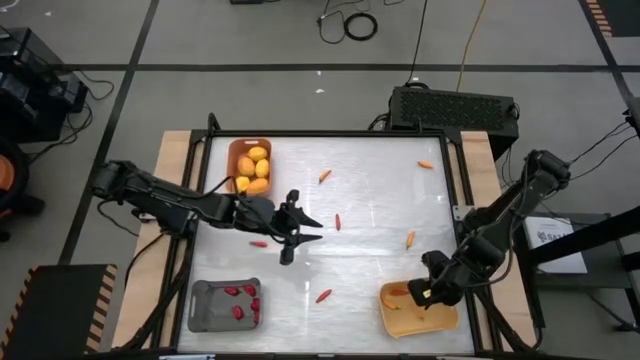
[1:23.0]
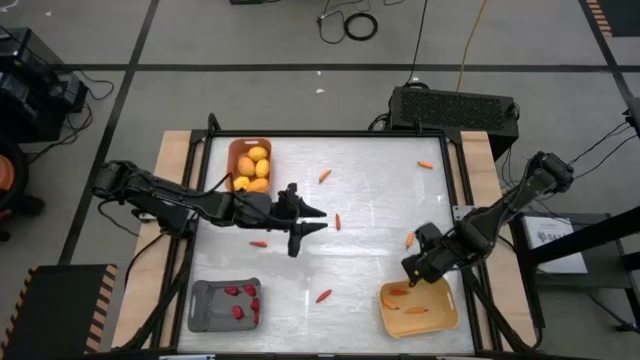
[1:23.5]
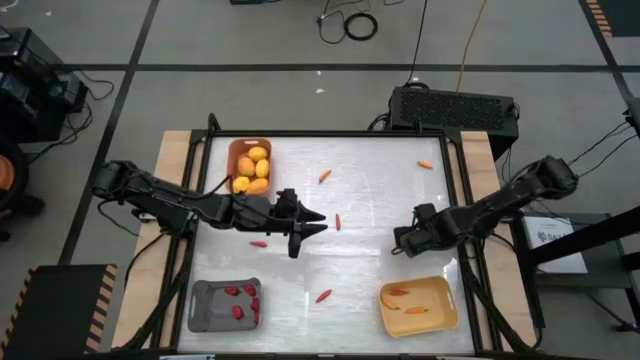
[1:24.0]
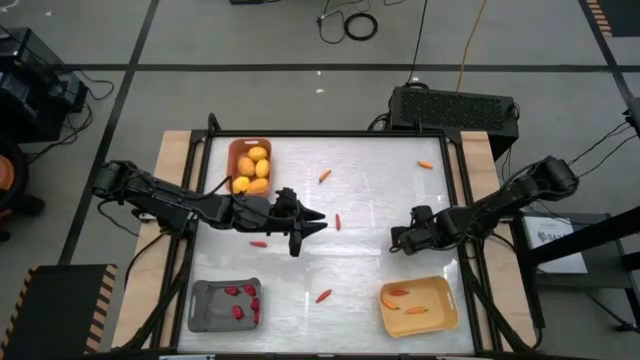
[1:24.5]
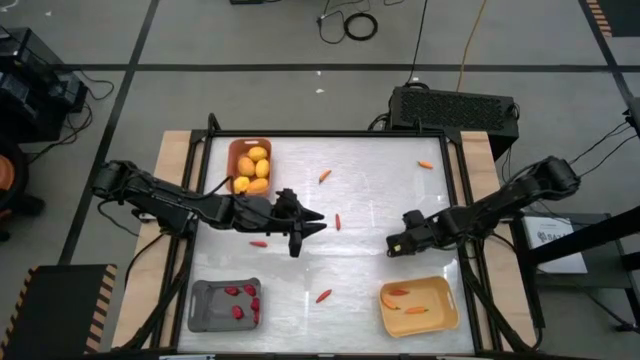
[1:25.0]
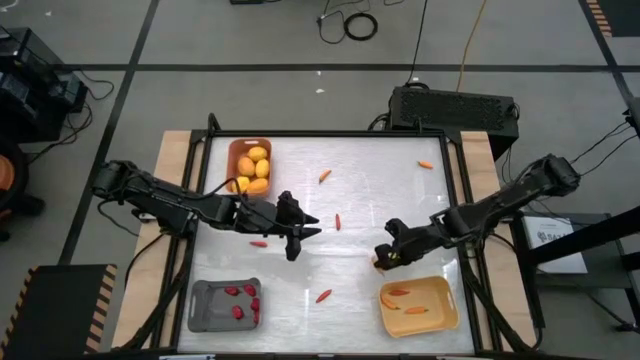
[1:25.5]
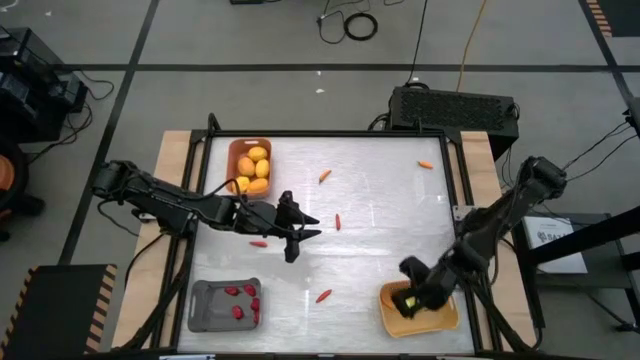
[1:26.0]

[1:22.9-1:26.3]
Task: Sort produce into baskets
Put the orange chili pepper into the yellow bin

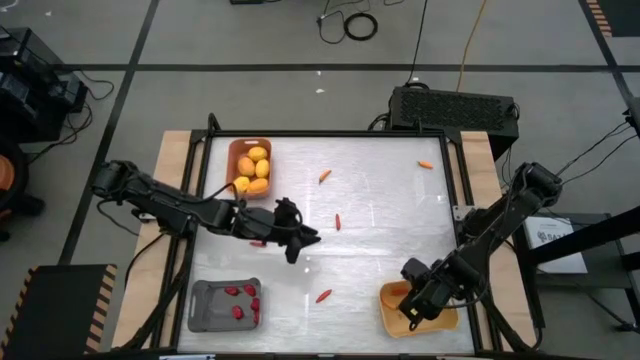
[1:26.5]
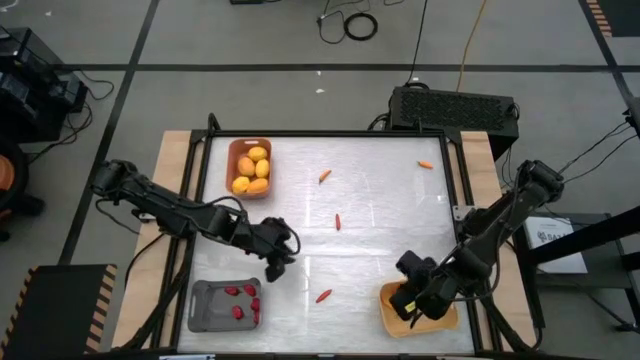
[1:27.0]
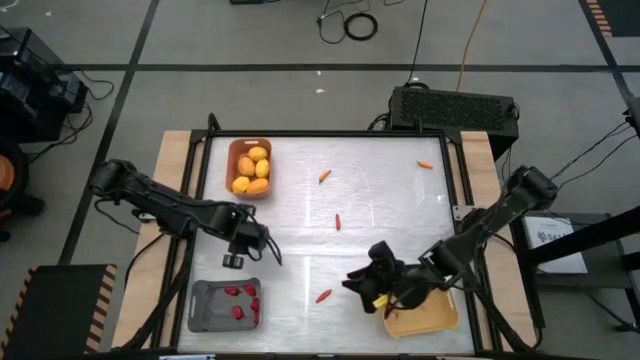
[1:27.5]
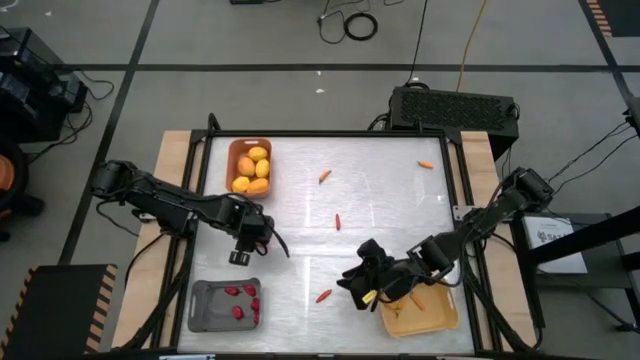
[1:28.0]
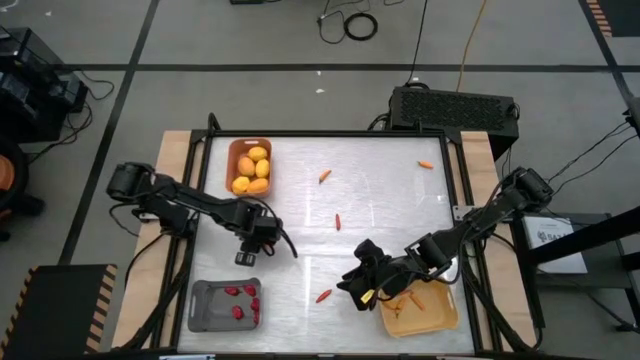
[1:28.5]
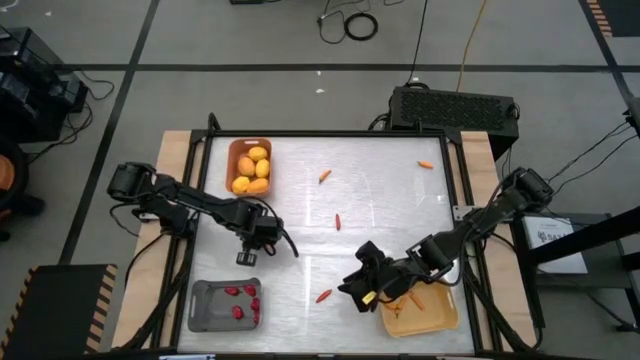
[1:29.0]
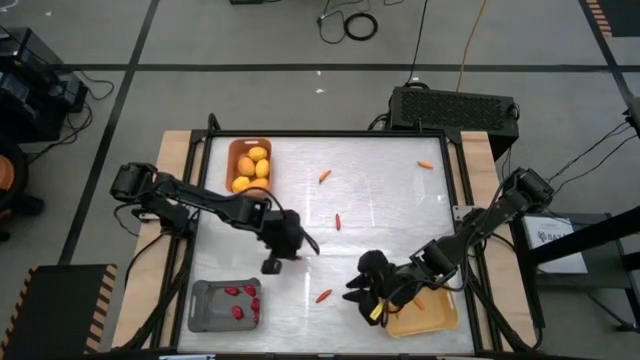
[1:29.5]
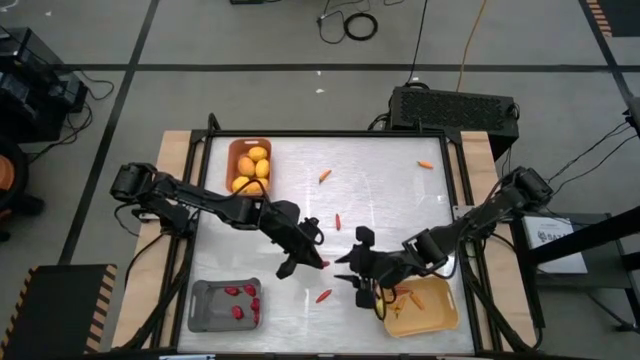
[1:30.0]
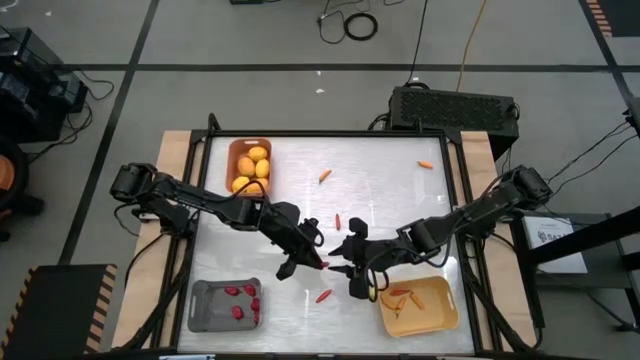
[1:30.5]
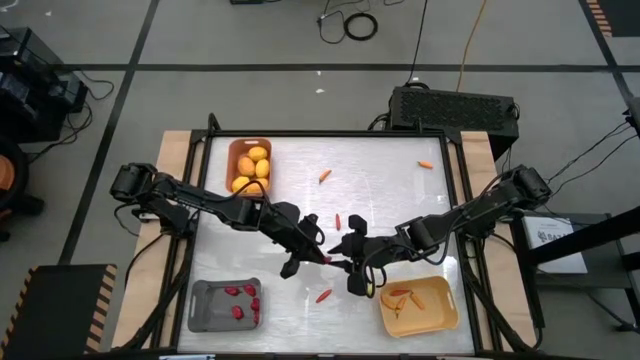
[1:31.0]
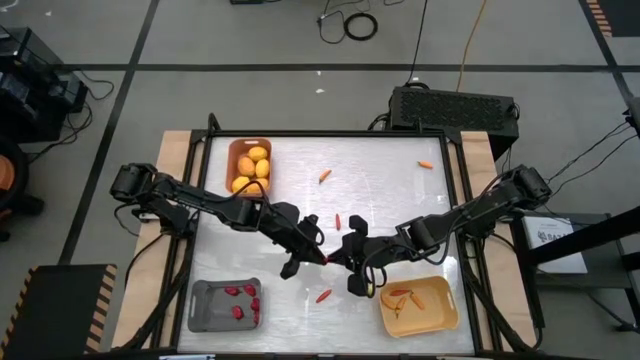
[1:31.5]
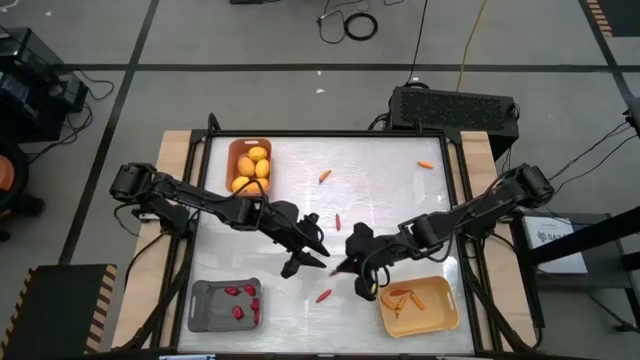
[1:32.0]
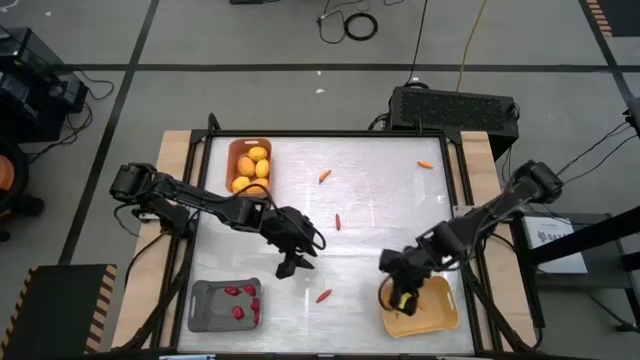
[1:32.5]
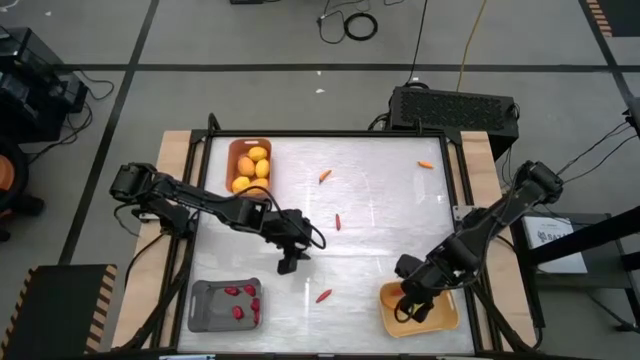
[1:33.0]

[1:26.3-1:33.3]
Put the red chili pepper into the yellow bin

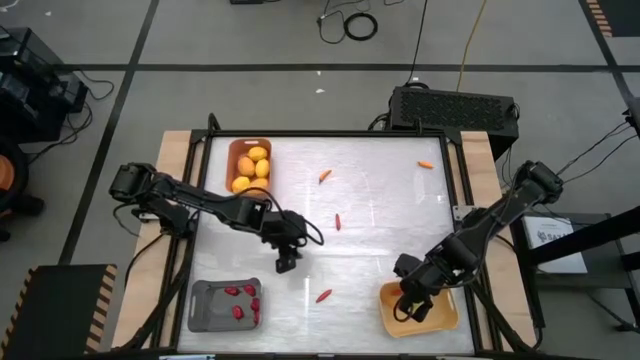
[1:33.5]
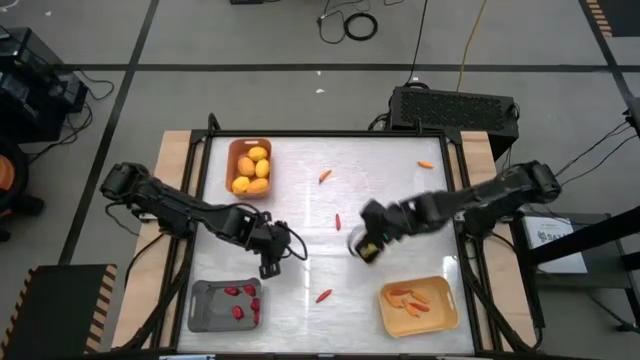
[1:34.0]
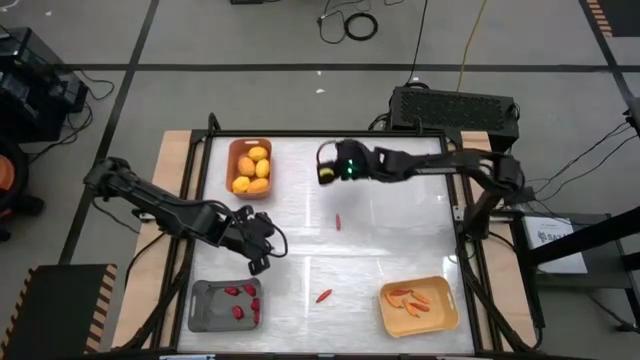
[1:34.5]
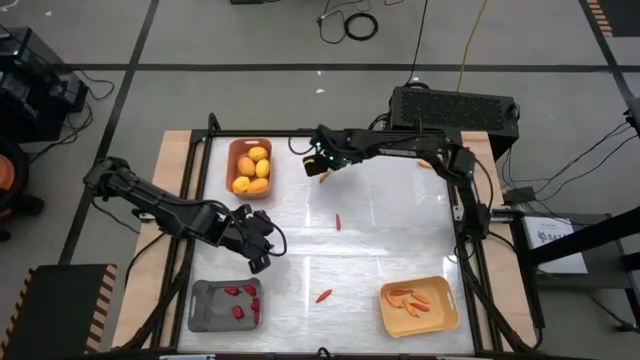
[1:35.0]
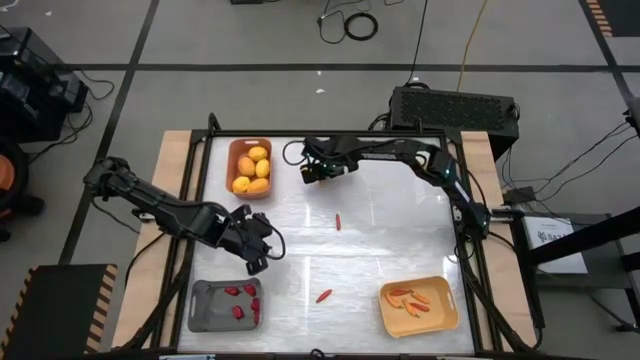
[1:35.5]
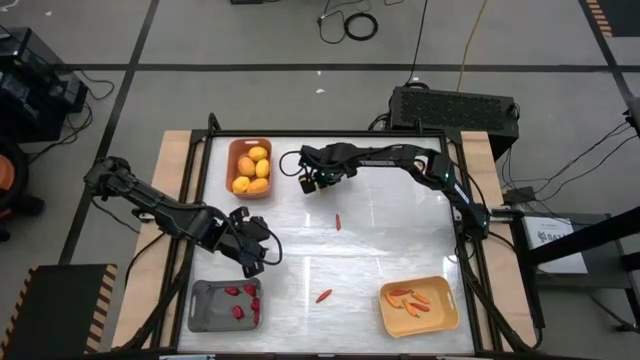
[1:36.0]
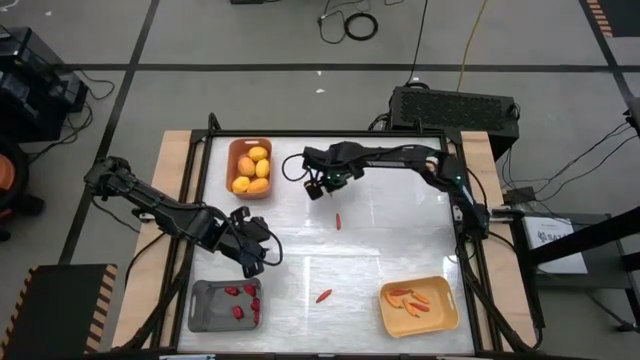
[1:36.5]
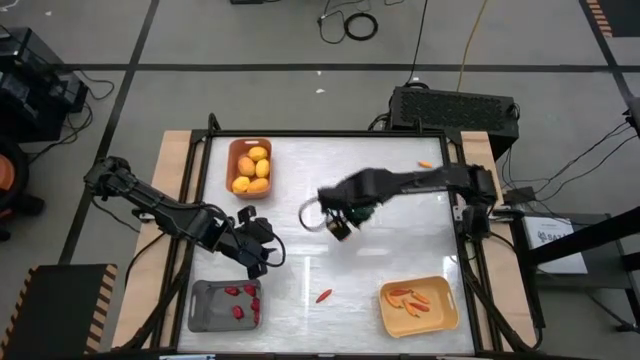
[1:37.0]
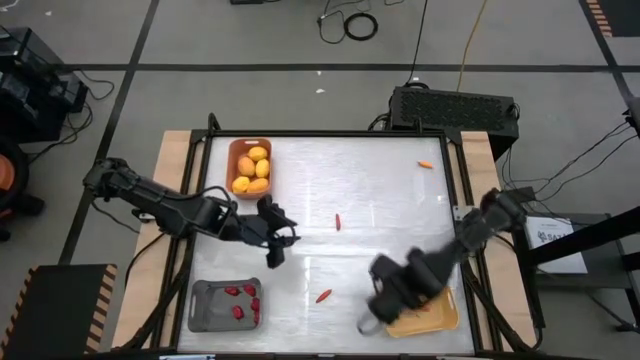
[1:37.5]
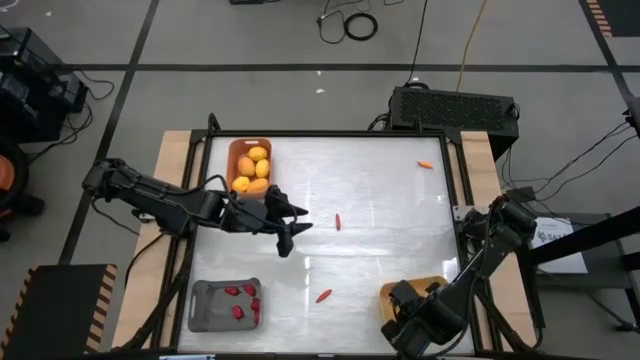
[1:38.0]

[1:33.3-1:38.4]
Put the orange chili pepper into the yellow bin

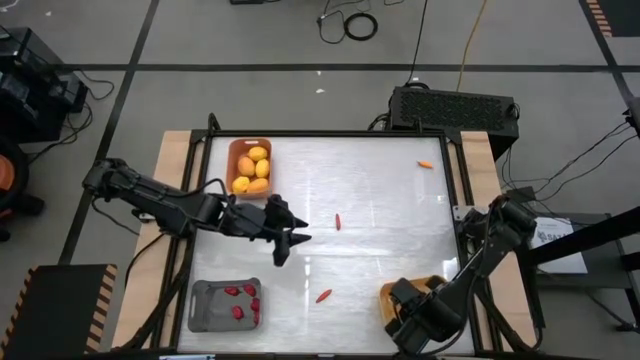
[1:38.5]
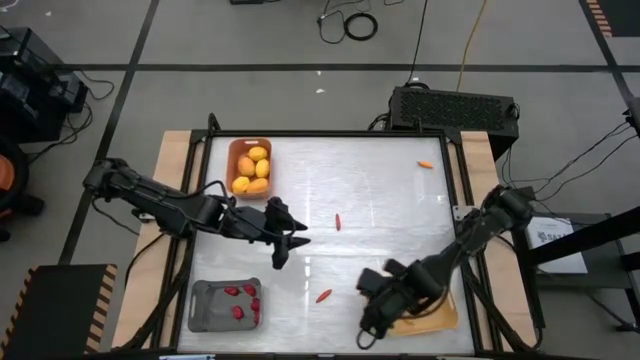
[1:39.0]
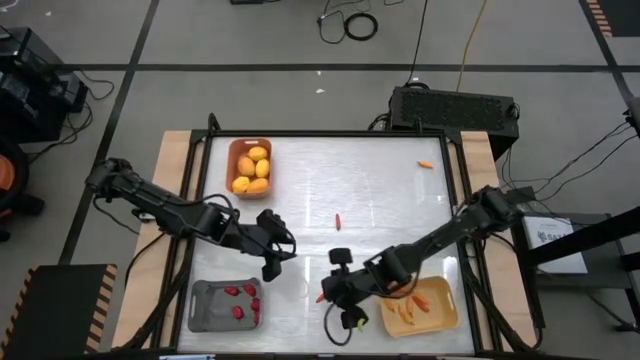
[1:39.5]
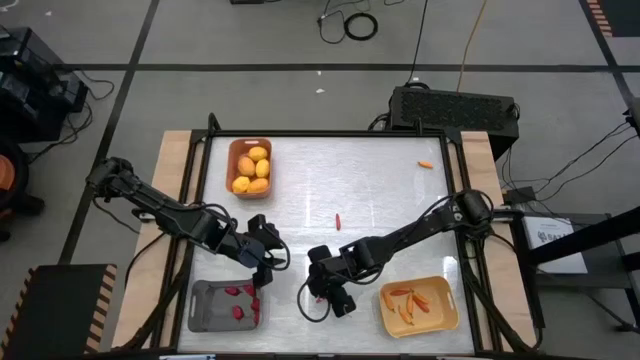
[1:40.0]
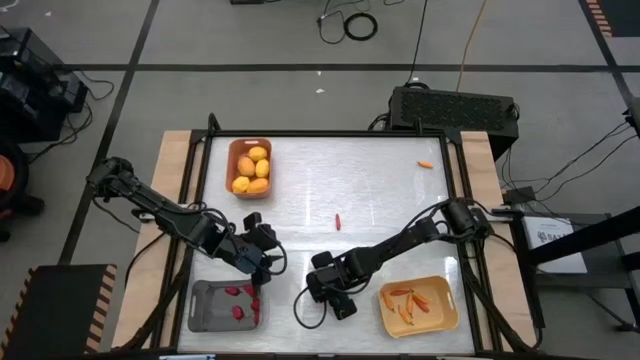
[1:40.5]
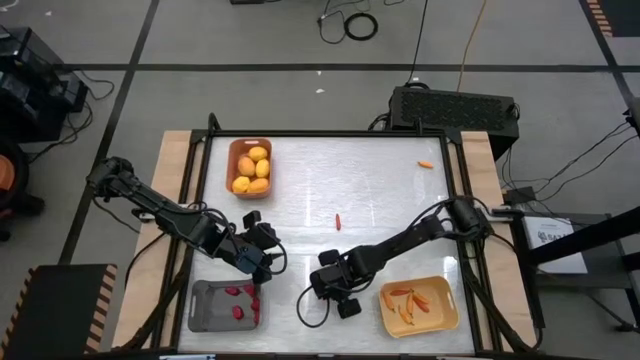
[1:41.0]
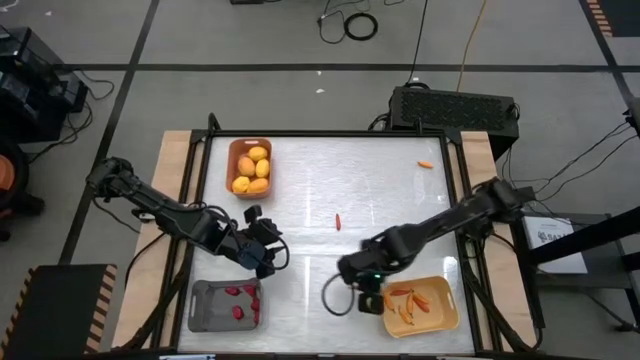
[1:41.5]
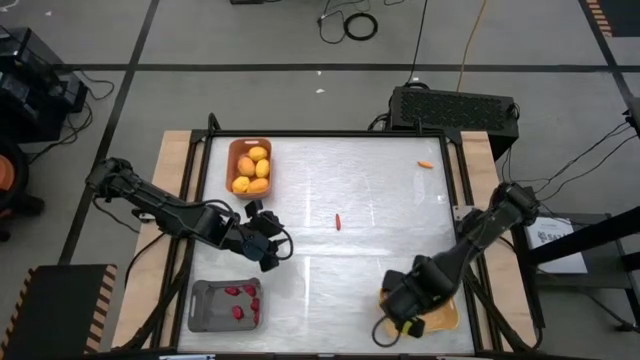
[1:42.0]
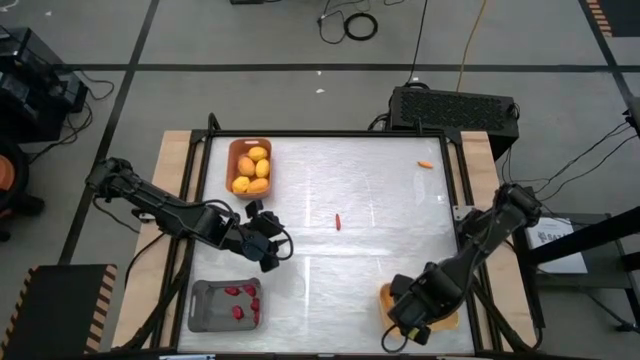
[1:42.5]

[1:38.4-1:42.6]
Put the red chili pepper into the yellow bin
